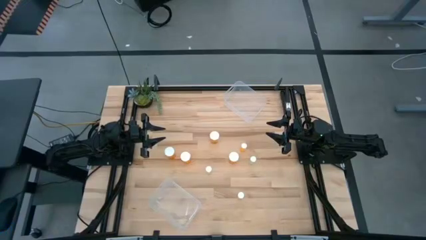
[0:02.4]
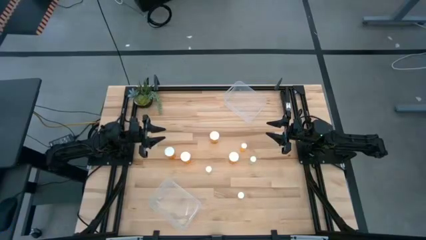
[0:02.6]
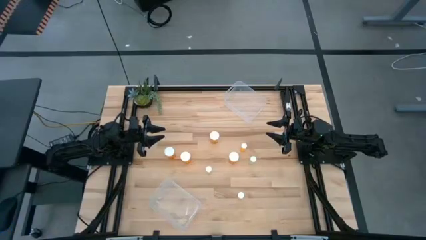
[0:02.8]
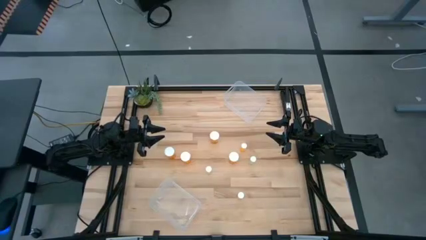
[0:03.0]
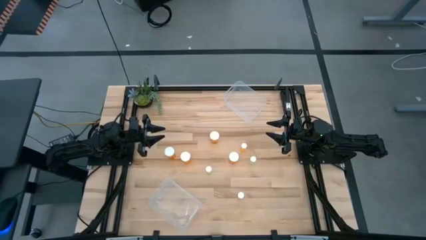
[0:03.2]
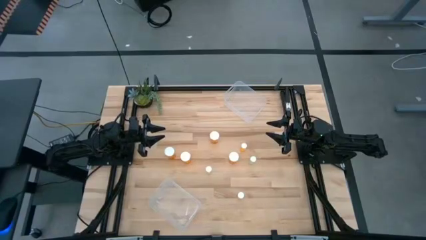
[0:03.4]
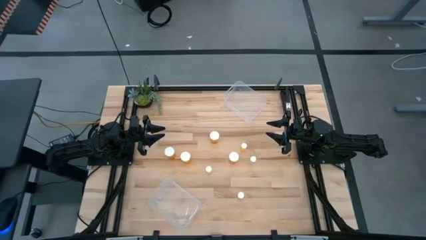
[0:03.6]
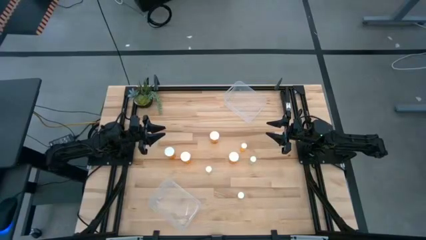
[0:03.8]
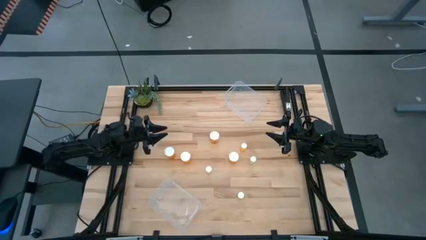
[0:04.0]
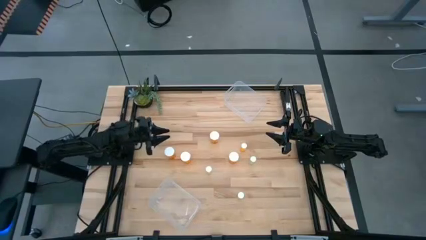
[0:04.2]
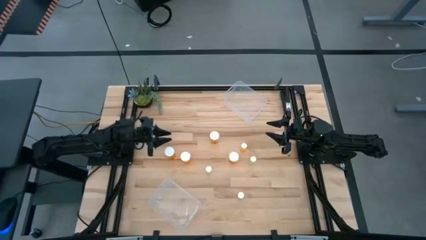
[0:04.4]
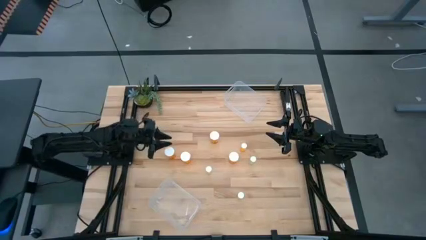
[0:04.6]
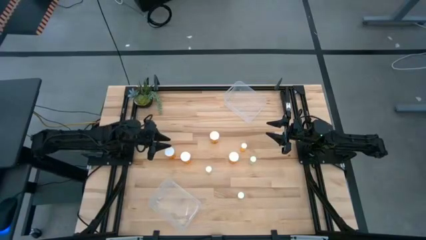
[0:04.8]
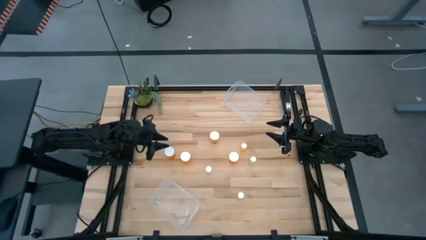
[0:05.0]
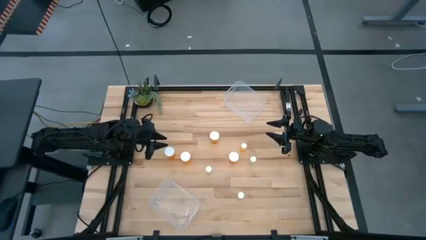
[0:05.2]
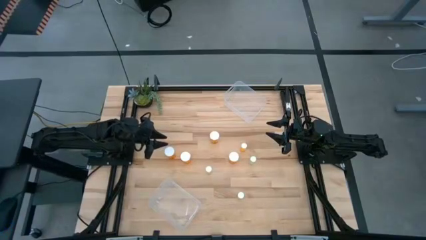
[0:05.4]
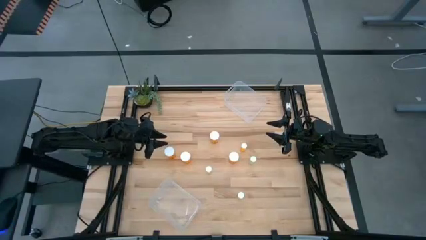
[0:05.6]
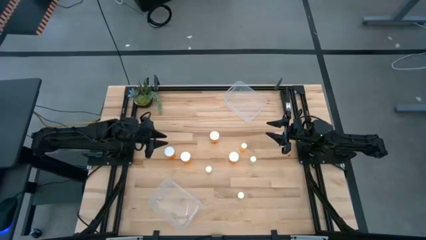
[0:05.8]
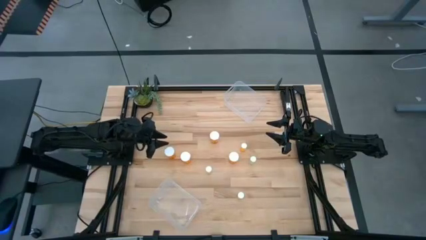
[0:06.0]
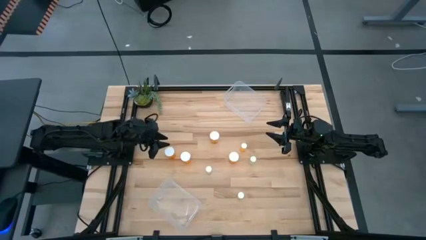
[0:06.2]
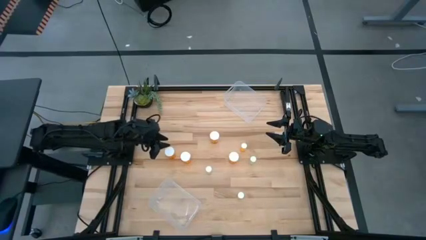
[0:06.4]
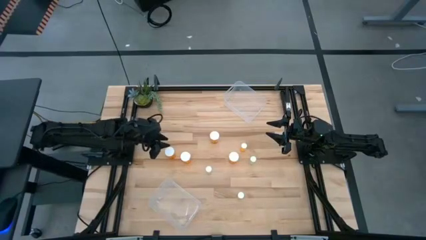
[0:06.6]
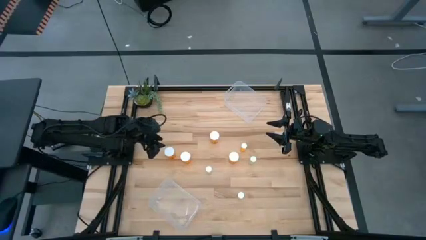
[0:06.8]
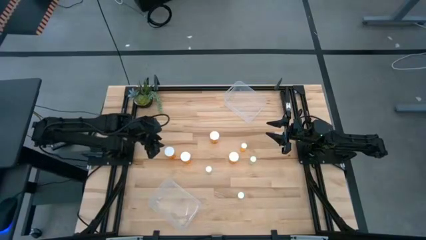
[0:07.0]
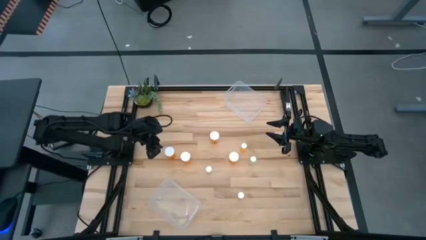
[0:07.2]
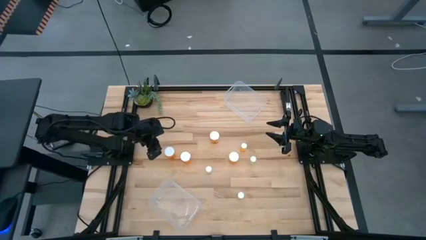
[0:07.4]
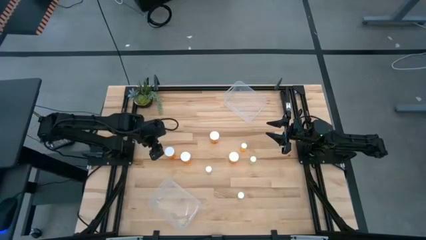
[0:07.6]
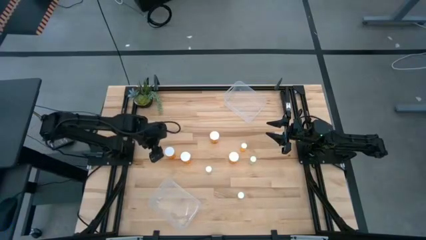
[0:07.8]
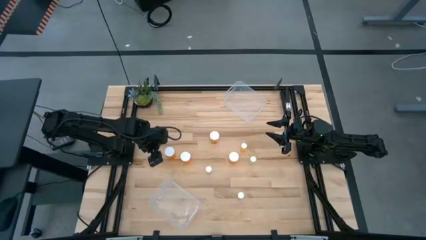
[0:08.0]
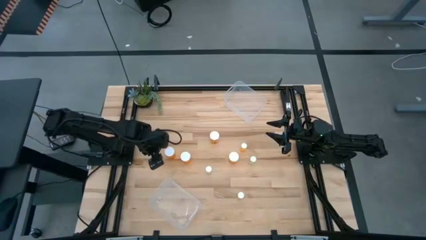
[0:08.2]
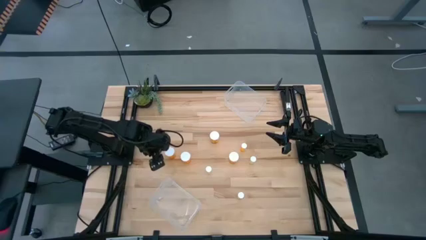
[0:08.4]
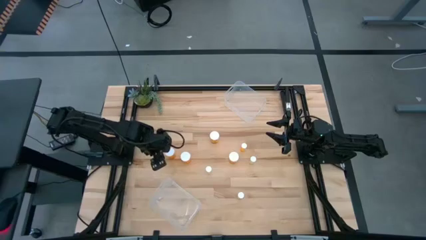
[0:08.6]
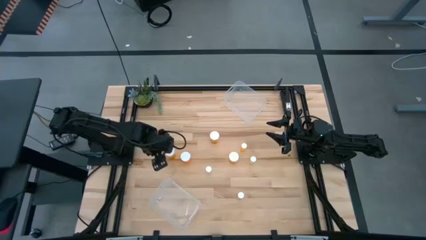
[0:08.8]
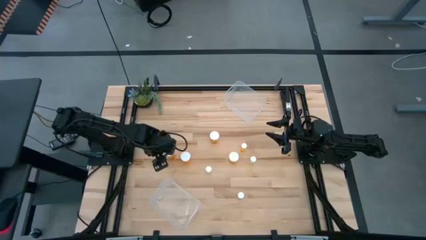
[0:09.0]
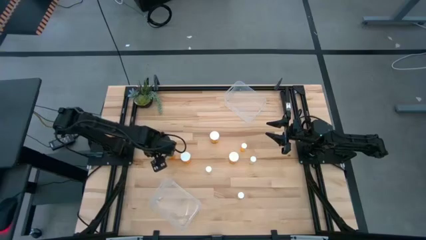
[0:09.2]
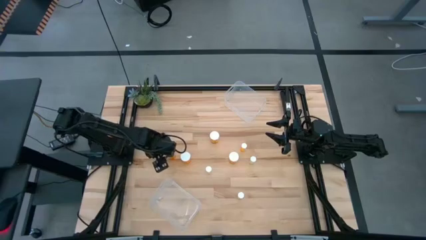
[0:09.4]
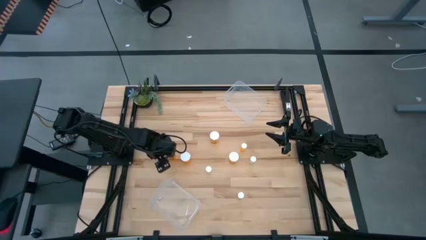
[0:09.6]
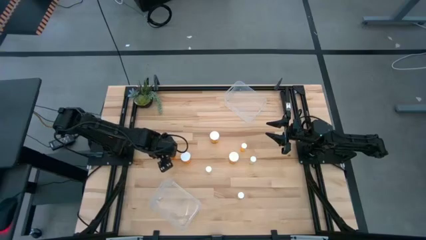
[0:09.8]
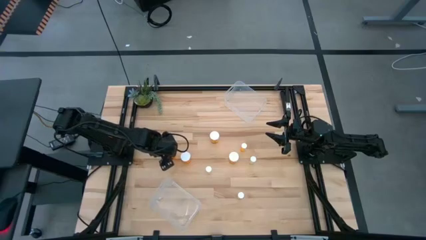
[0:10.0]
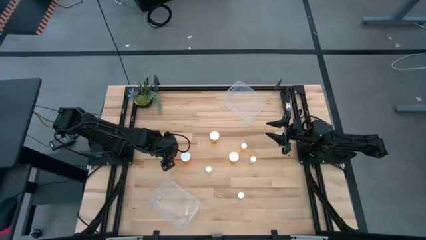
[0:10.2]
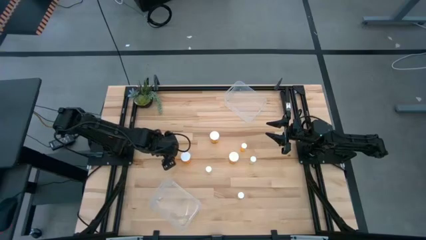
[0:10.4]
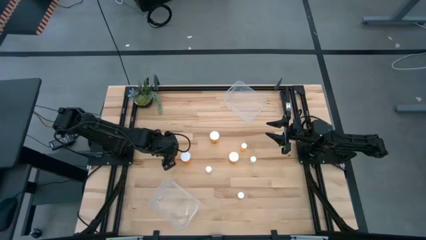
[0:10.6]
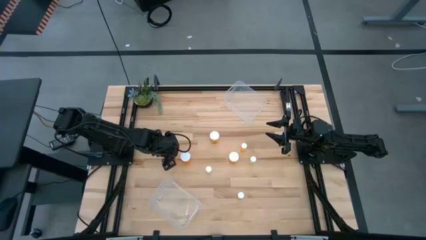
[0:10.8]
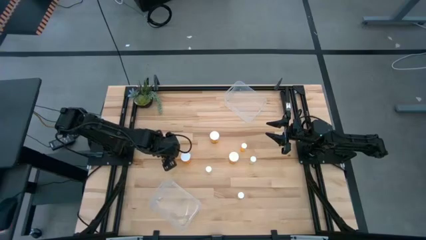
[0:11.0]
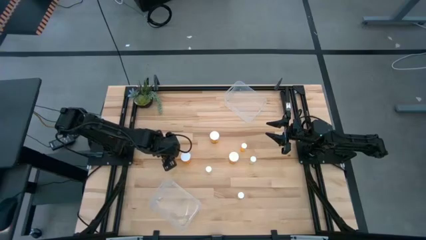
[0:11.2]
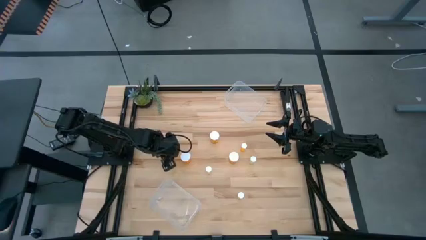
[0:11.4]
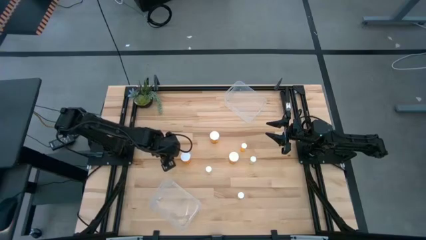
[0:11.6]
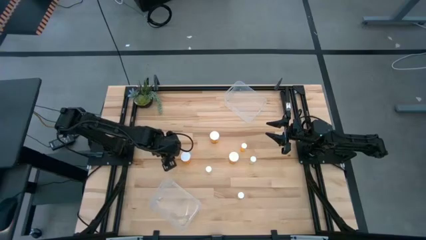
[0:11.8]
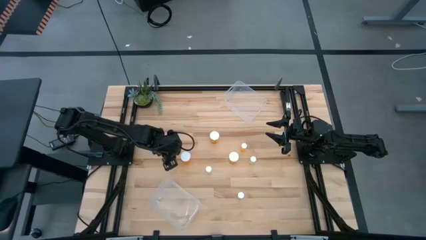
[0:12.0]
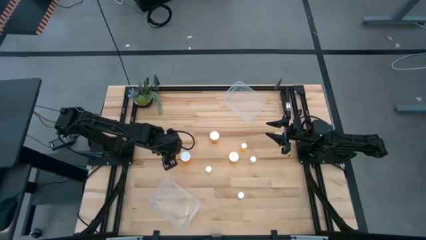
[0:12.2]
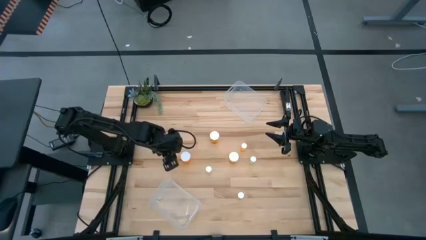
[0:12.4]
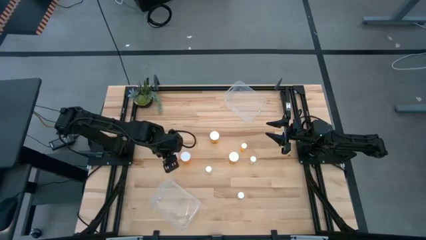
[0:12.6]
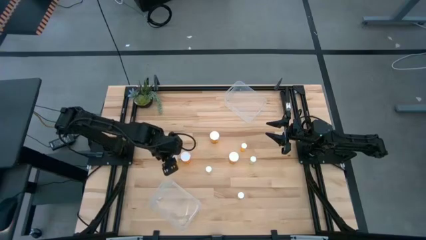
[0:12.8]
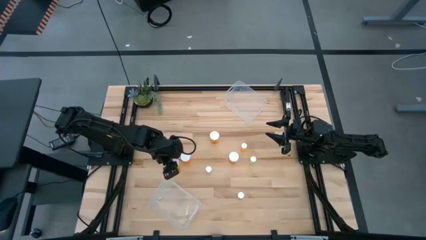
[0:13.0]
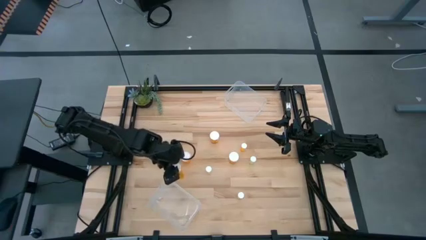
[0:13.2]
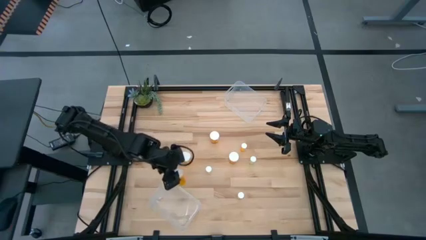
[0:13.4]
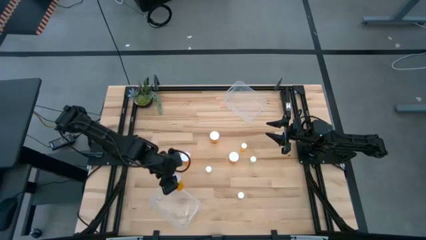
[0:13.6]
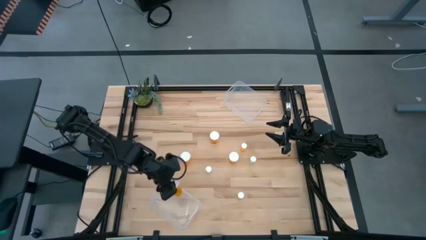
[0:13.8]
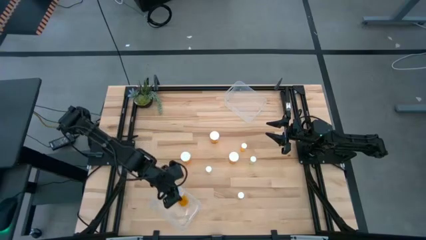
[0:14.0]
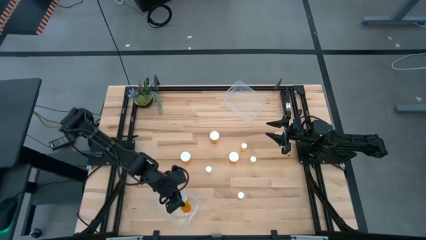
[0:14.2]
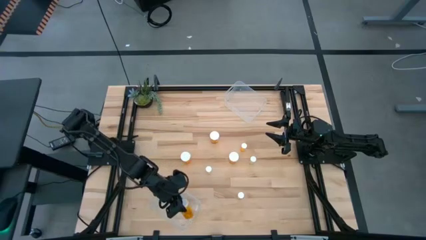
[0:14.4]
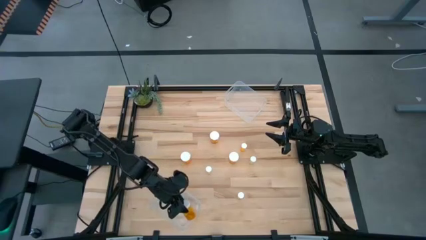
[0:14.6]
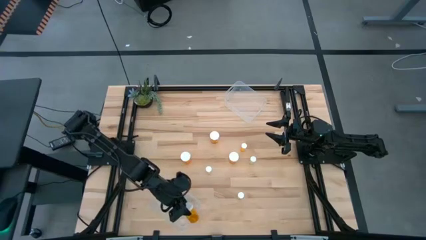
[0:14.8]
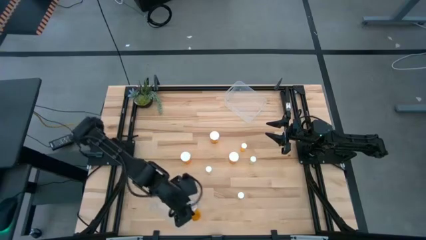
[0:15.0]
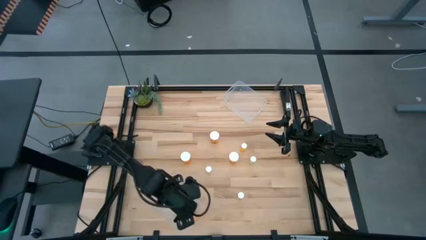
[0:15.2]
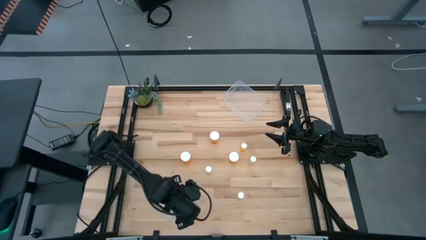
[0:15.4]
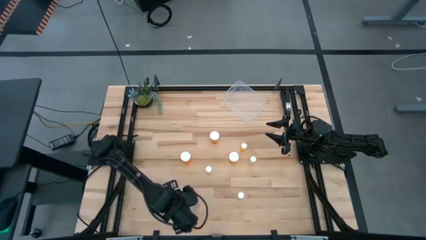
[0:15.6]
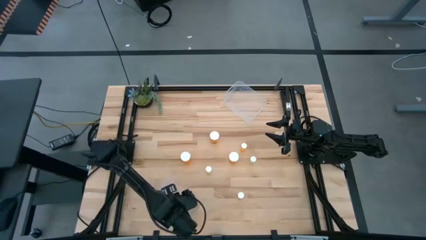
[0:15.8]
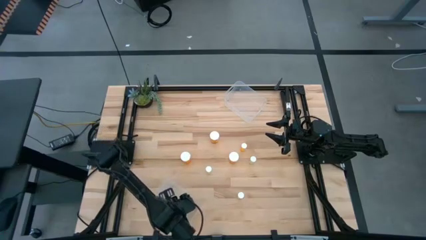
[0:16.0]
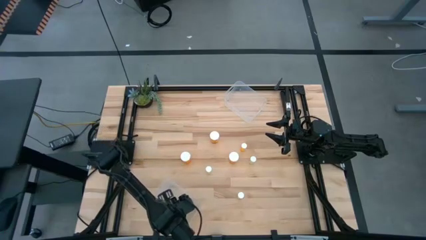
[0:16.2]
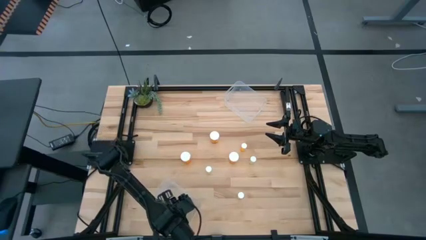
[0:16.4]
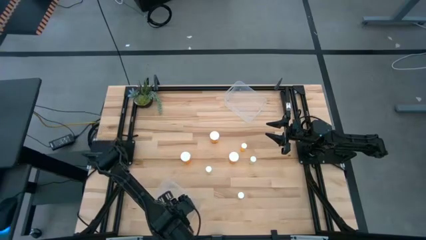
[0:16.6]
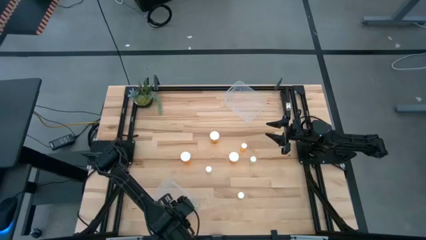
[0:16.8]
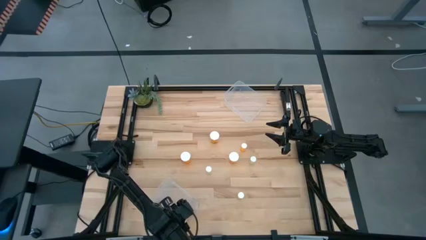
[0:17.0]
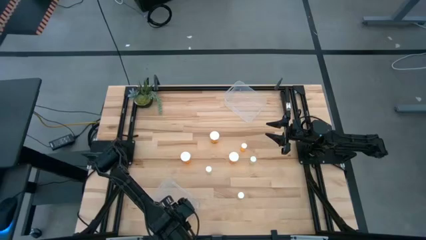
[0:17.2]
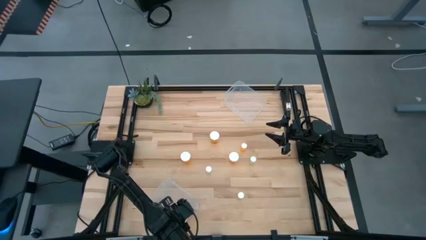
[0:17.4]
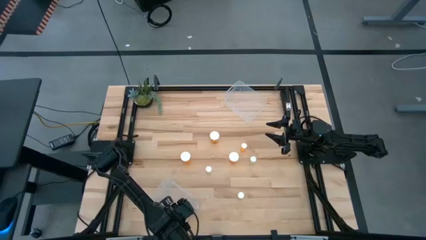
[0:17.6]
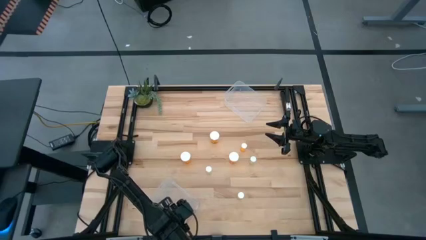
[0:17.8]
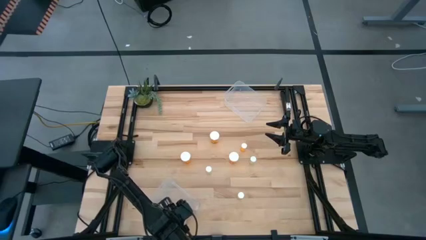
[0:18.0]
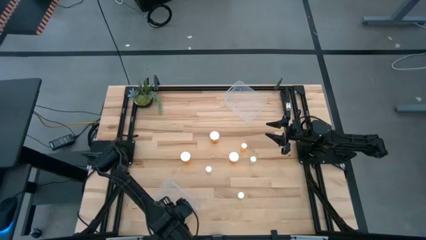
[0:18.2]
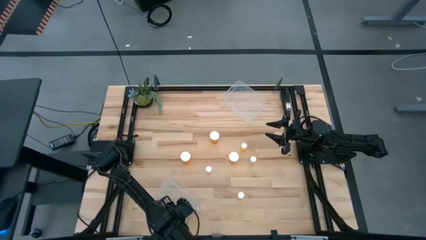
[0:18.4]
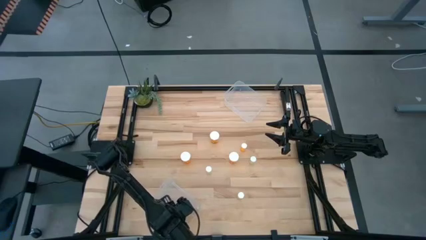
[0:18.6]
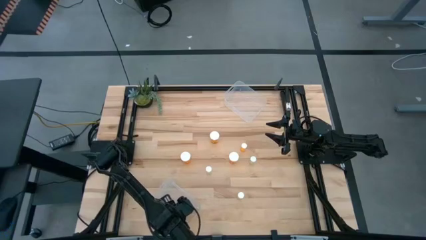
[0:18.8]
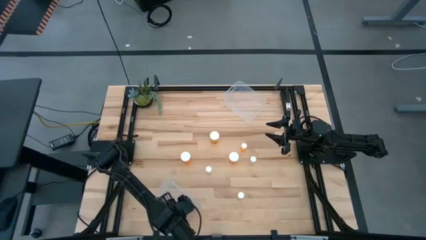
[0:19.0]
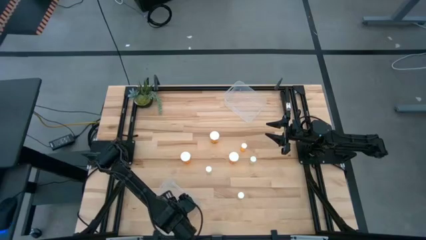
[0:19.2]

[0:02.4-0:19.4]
Task: Pick and place medicine bottles into bin by pill shape (circle, oval)
Put the orange capsule bottle into the bottom transparent bin
